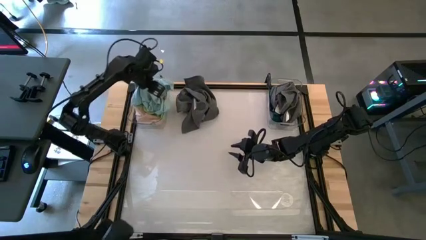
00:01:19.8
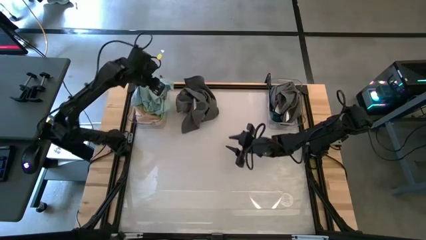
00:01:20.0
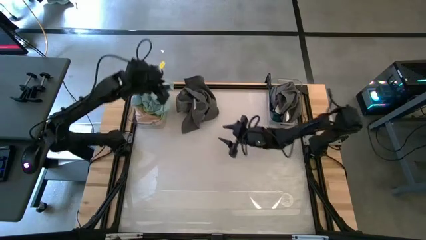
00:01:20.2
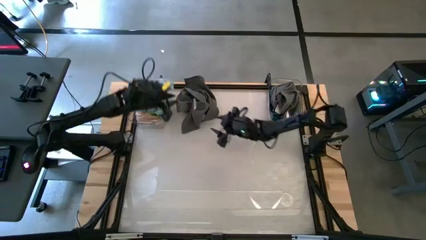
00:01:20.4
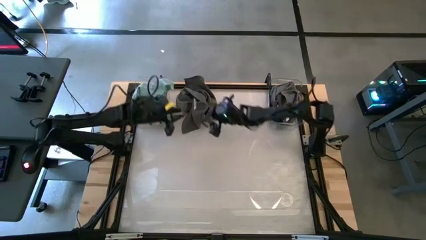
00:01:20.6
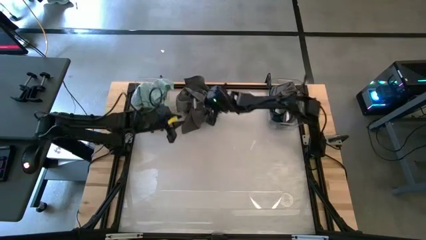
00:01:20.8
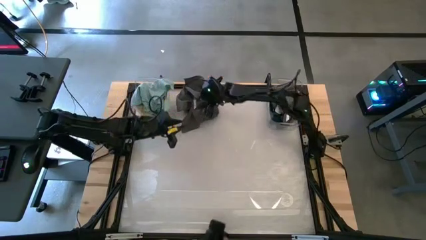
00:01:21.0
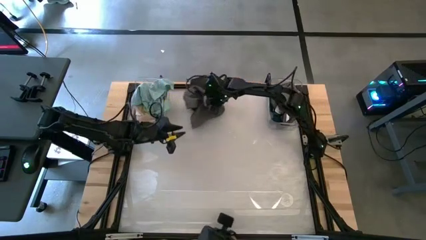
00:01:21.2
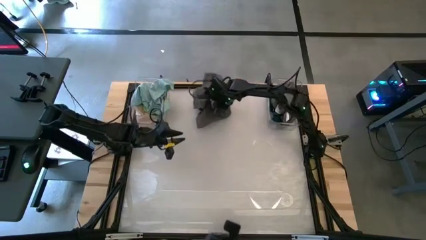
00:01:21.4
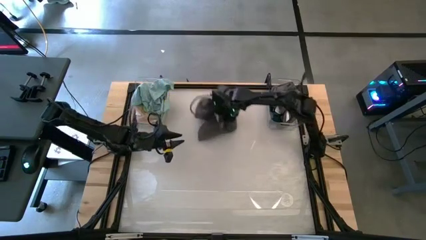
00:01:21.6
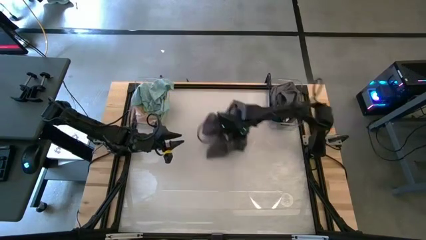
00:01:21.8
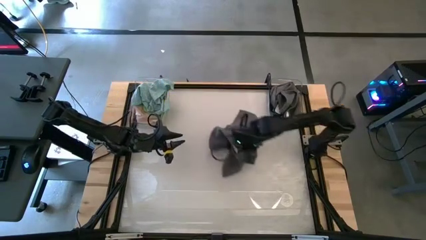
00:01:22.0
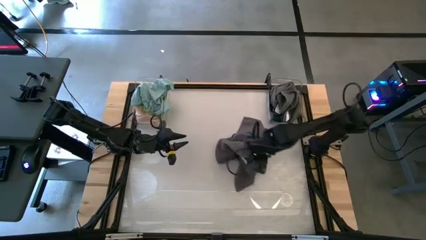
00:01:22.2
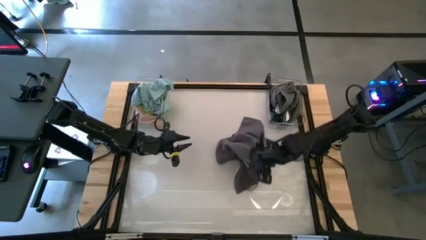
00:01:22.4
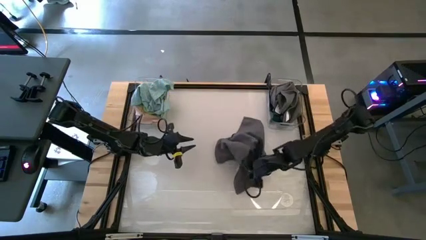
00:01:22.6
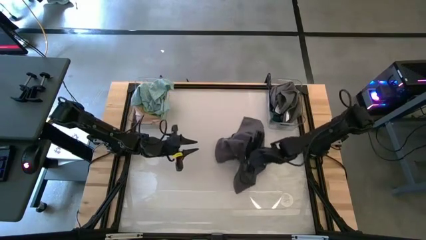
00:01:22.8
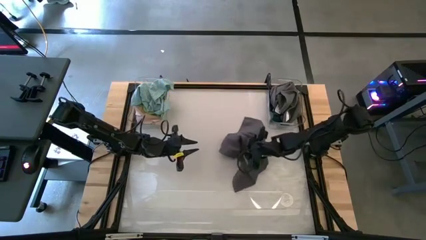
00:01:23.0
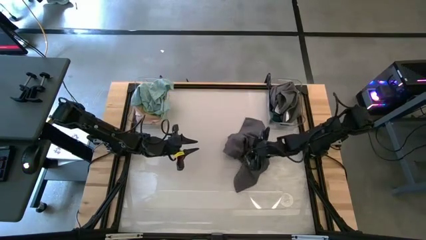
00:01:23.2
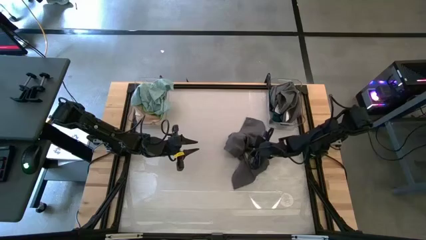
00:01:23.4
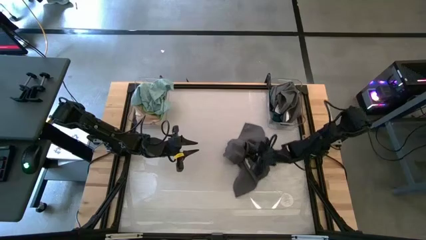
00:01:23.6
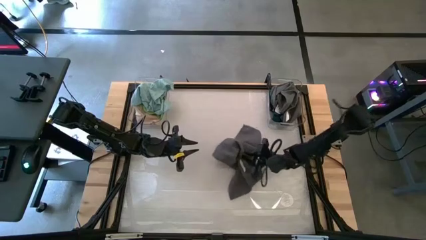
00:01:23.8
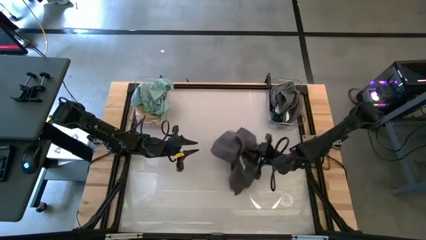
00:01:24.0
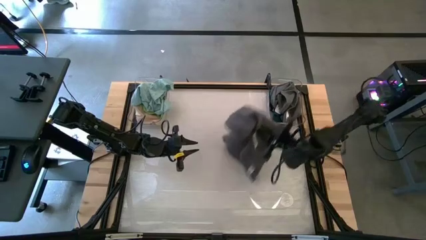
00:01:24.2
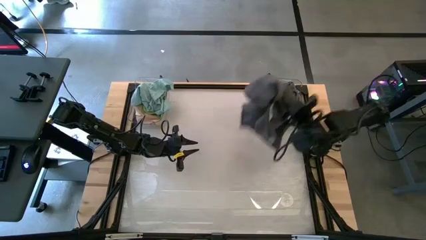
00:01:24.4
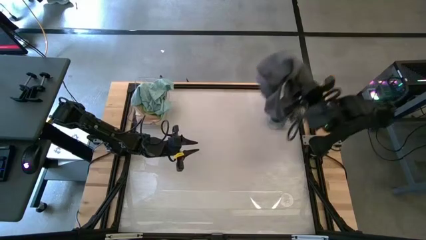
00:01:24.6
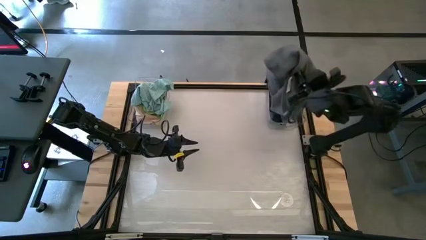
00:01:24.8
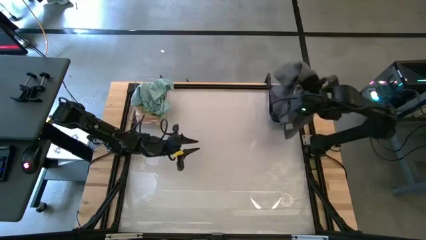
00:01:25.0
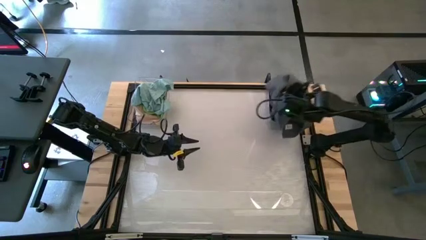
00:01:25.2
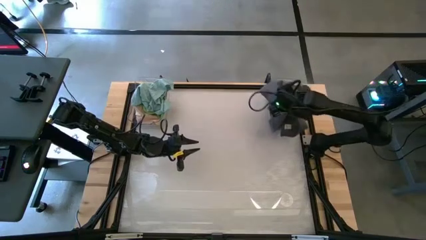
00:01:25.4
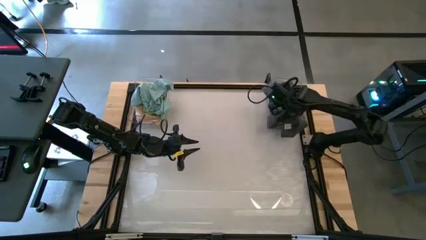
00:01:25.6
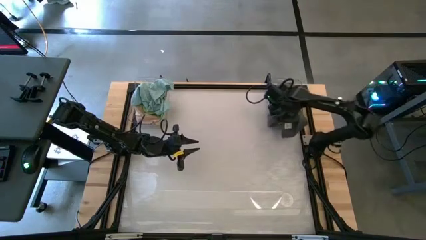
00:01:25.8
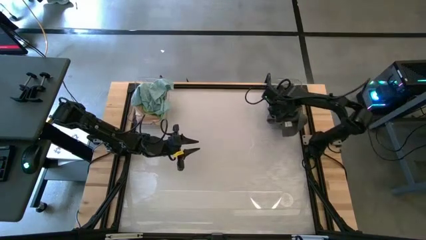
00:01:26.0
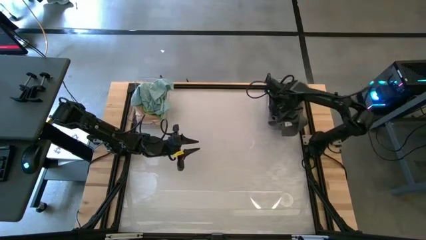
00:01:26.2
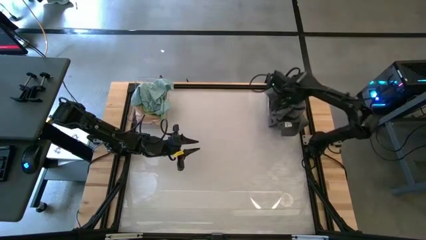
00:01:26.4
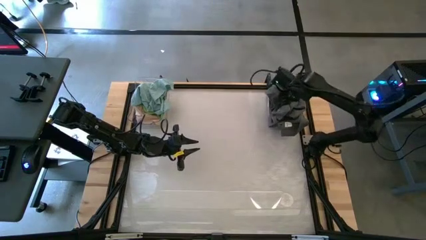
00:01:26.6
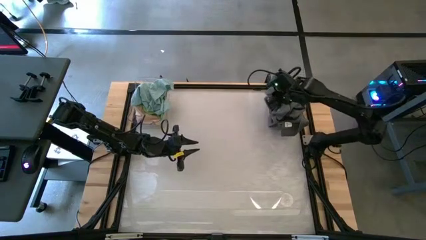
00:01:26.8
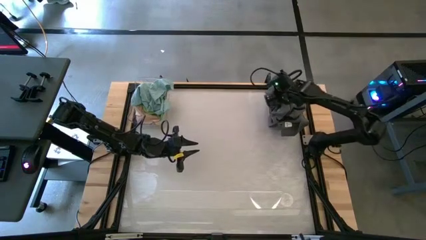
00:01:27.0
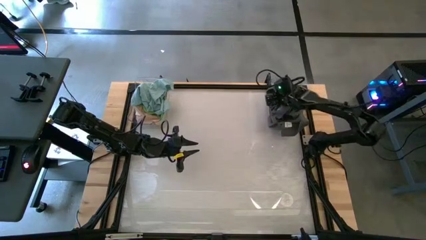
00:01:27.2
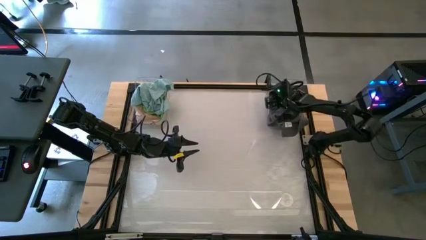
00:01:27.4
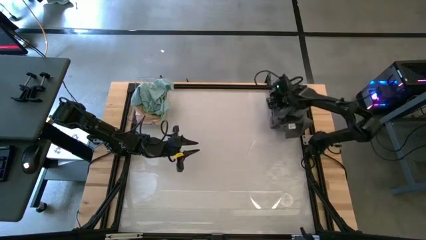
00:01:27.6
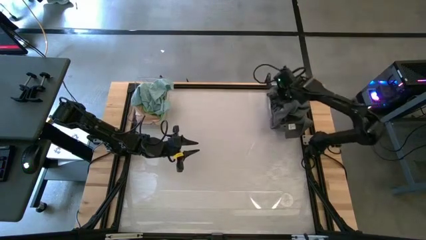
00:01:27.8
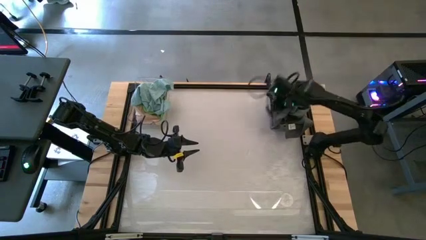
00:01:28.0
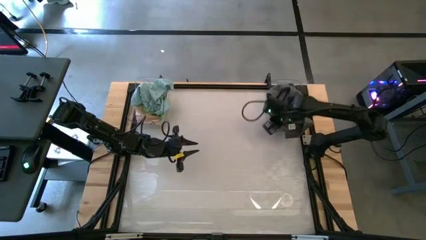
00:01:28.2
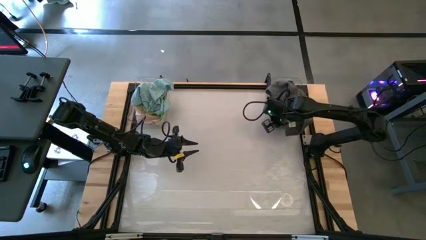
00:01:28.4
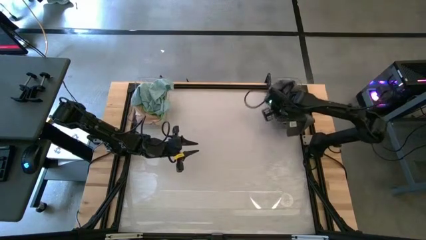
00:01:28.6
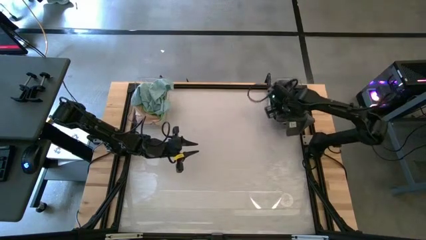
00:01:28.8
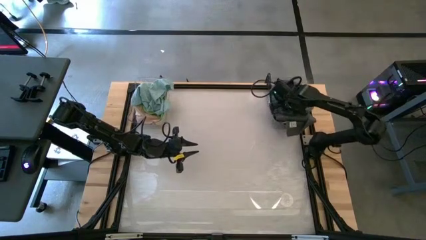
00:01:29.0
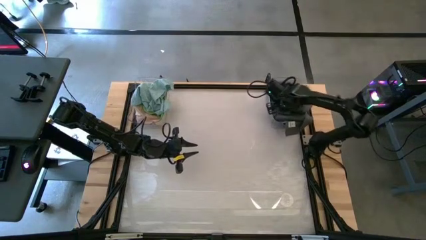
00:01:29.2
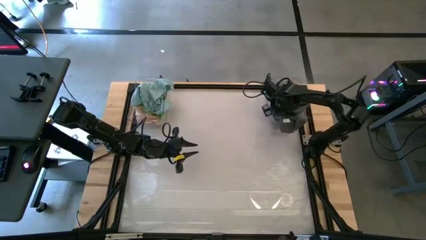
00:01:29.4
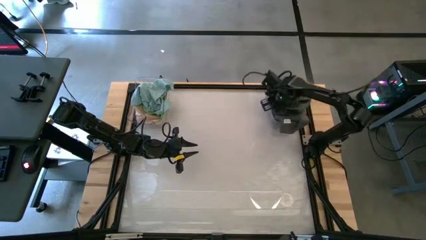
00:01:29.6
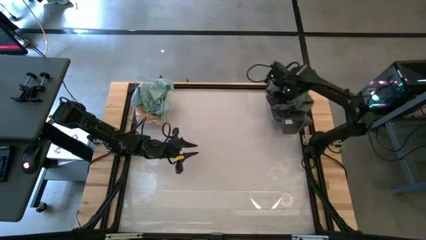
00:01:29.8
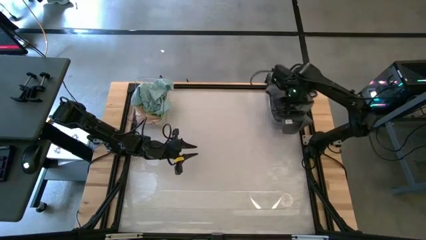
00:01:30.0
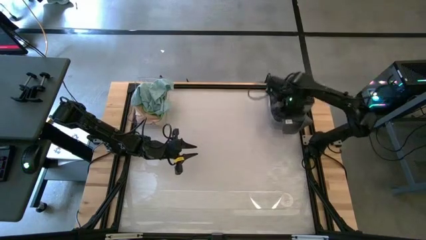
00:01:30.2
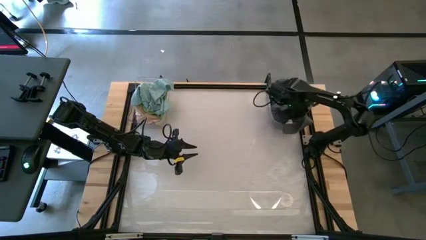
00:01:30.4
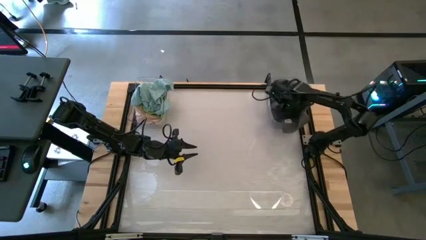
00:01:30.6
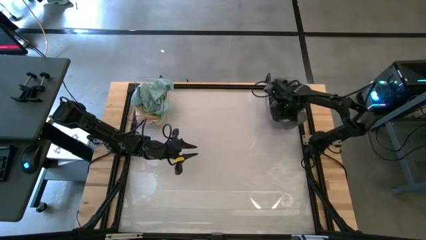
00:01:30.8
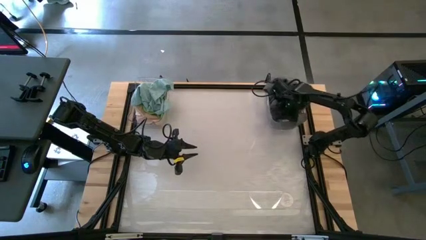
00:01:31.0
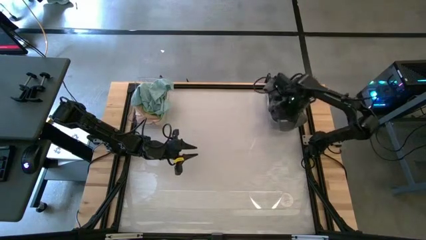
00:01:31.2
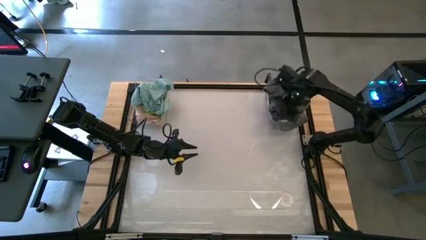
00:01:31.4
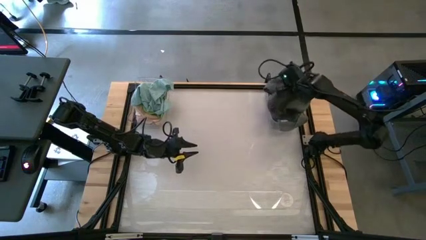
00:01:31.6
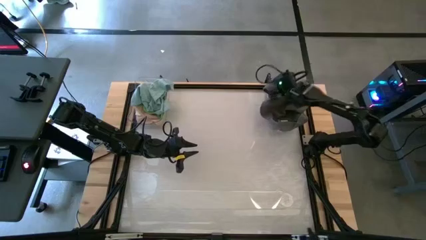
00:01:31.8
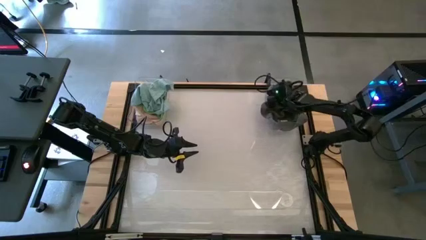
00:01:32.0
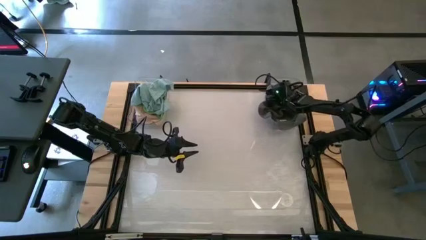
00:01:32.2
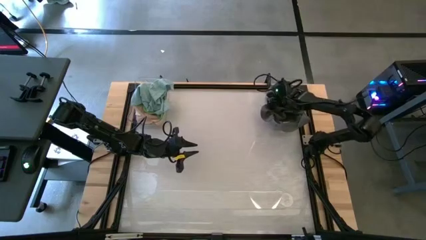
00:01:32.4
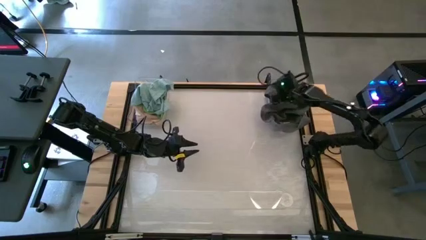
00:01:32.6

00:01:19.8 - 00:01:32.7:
Task: Sort towels by color in basket
Put the dark gray towel into the right transparent bin

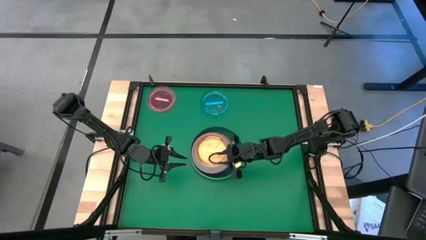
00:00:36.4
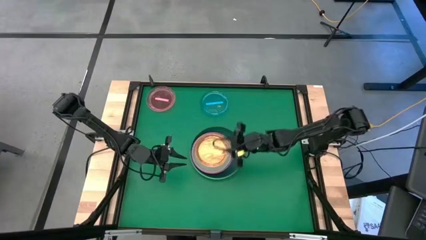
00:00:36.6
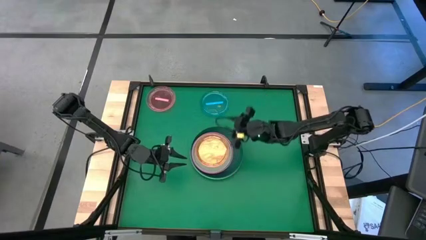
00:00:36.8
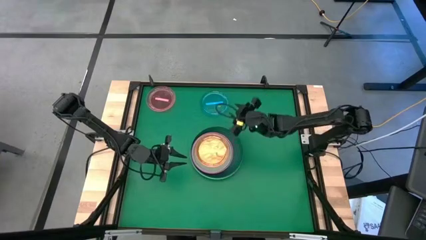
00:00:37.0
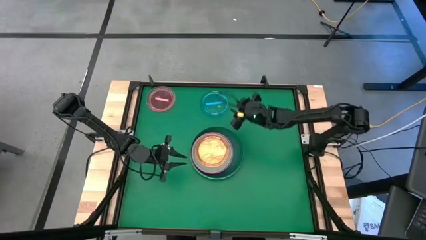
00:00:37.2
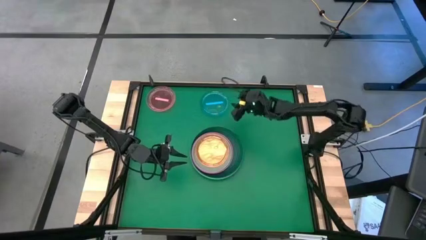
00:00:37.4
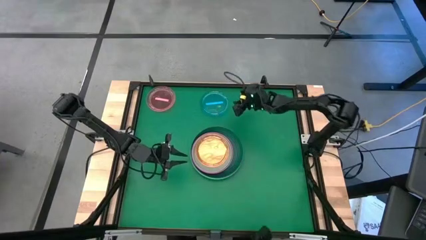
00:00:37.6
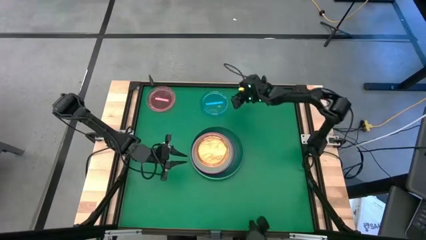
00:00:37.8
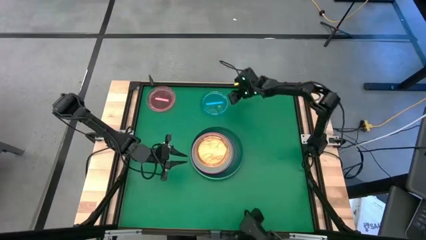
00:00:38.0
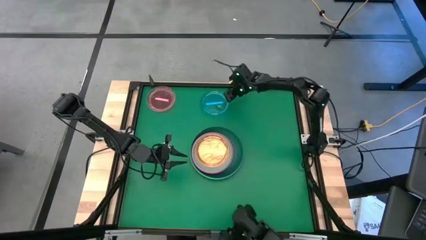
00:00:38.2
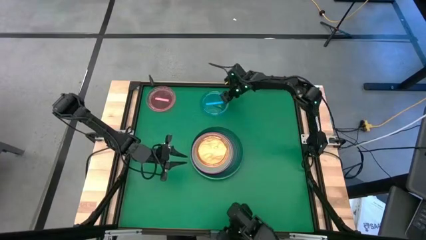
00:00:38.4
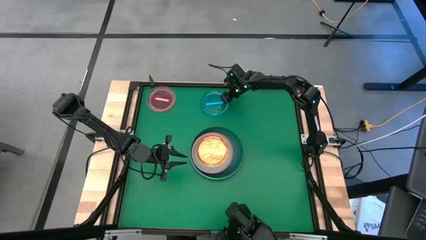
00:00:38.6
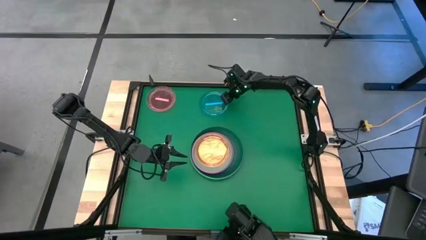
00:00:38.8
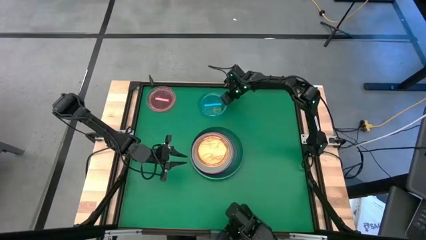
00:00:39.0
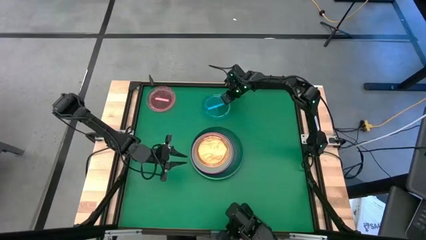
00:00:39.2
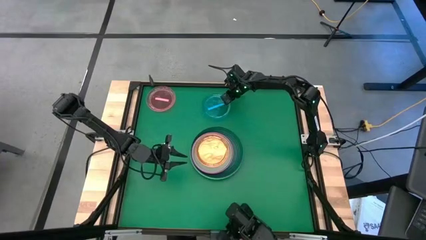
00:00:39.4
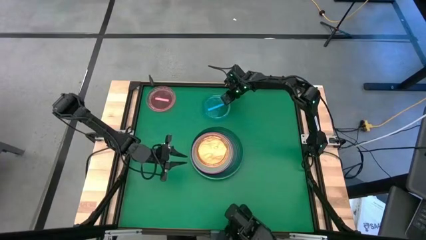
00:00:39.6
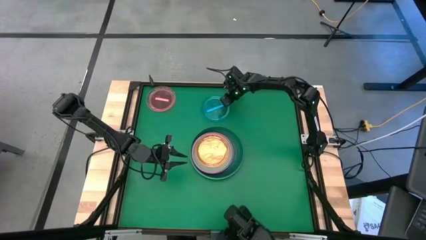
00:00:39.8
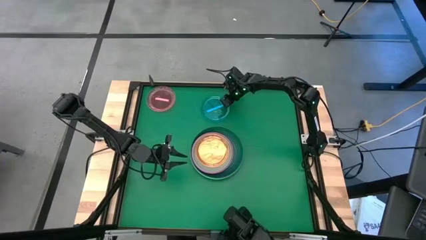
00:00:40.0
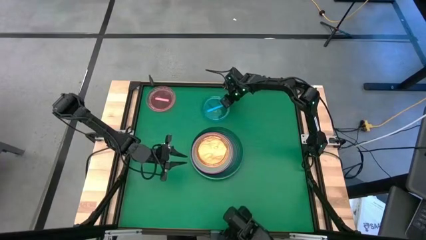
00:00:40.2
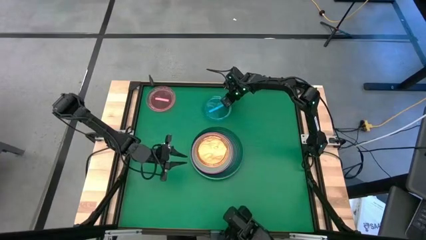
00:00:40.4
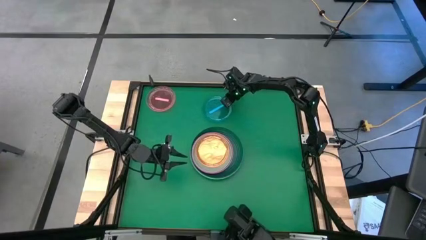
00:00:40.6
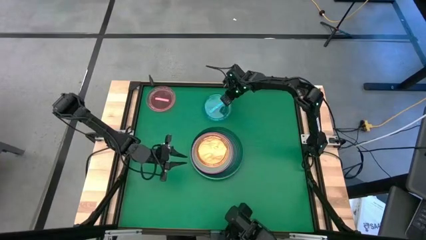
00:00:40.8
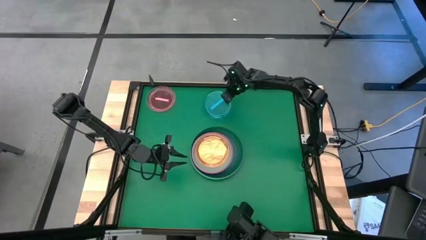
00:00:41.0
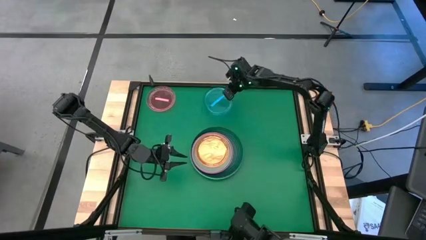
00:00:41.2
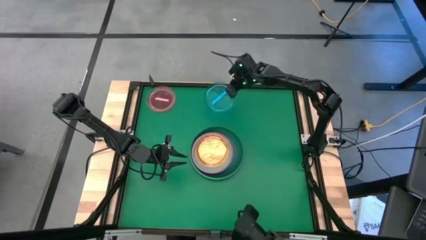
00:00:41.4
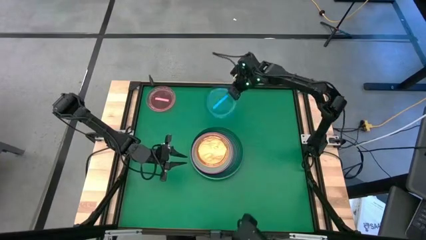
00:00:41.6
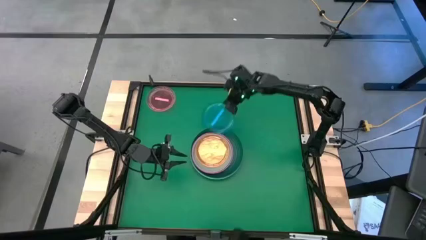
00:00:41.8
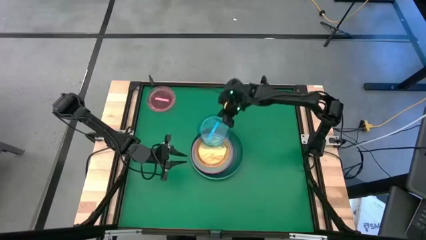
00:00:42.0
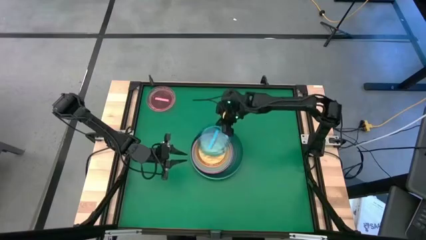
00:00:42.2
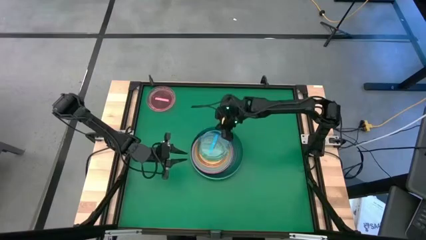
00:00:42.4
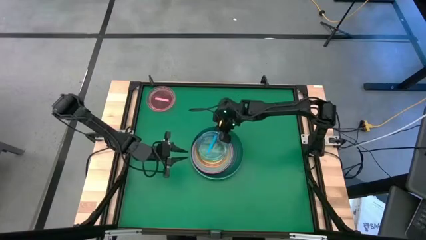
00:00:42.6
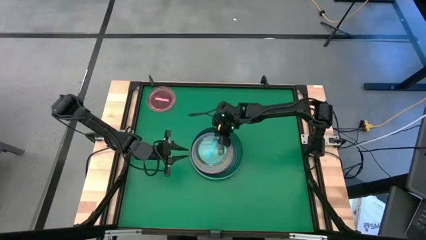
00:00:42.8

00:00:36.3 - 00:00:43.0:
Task: Stack plastic plates
Stack the blue plate on top of the orange plate
